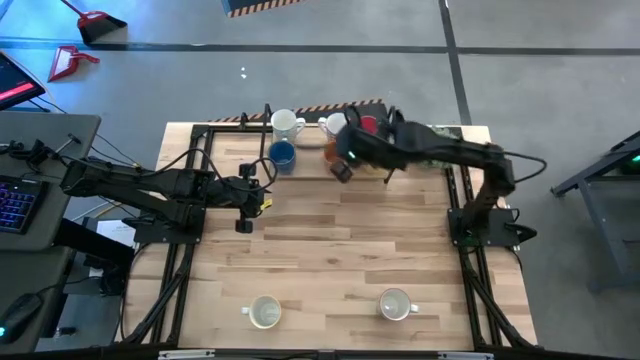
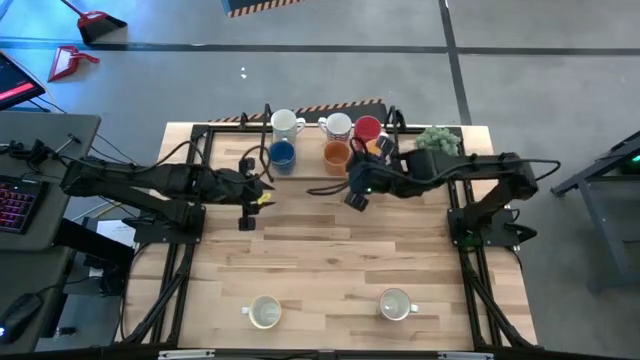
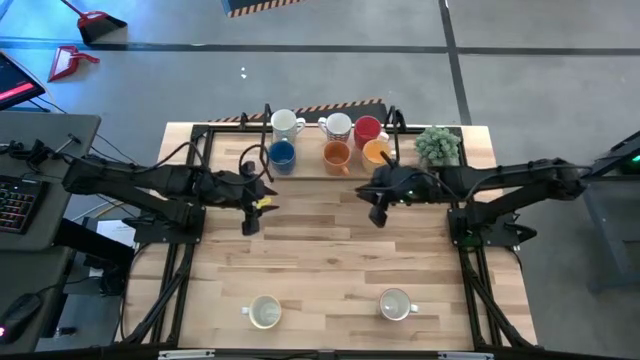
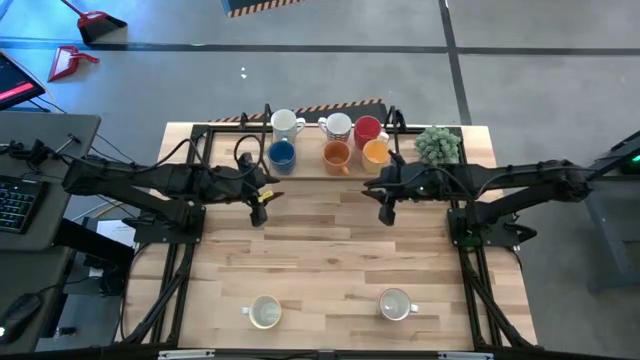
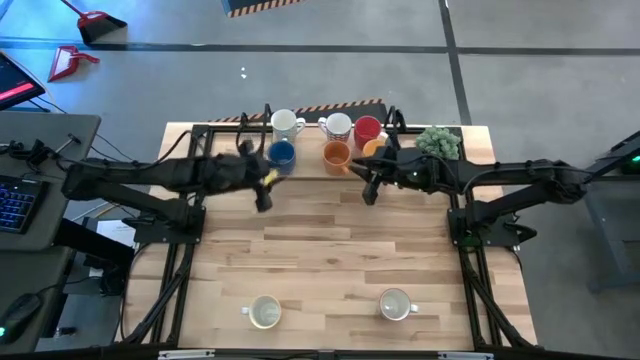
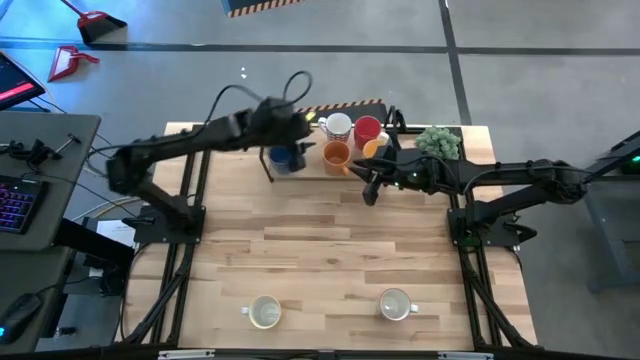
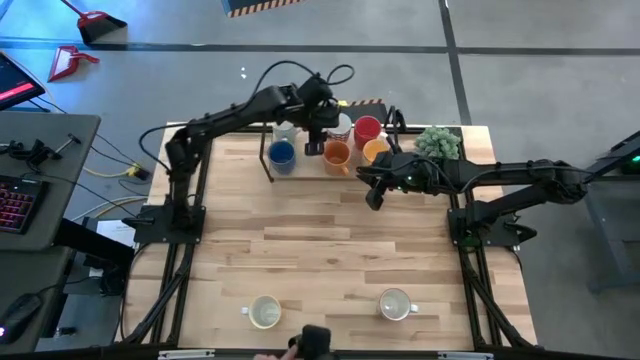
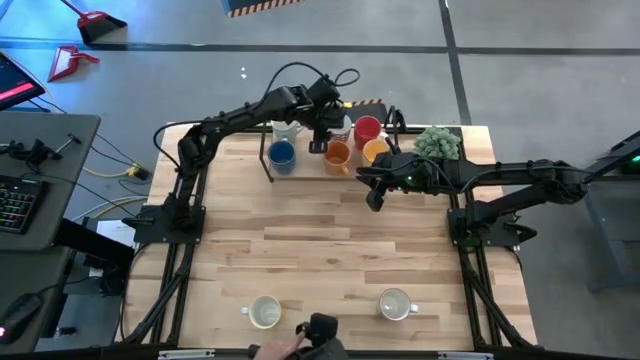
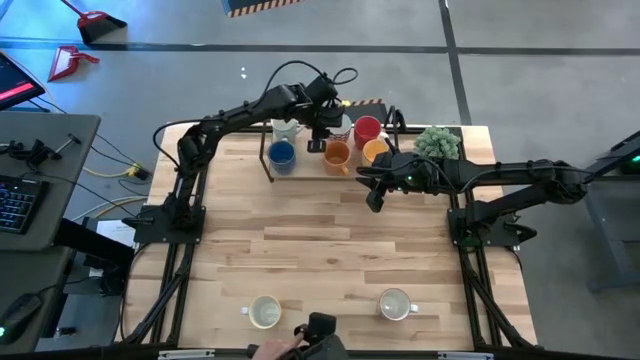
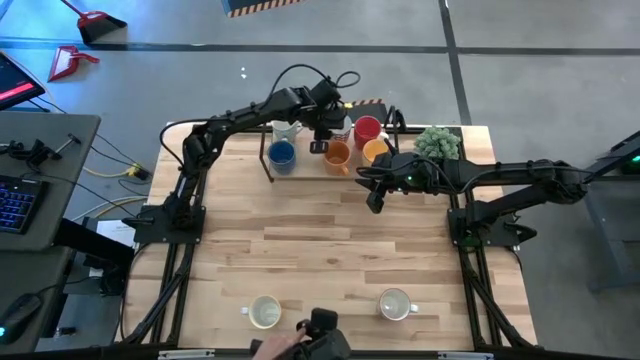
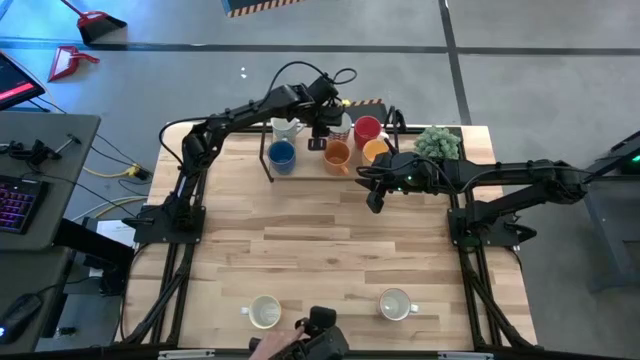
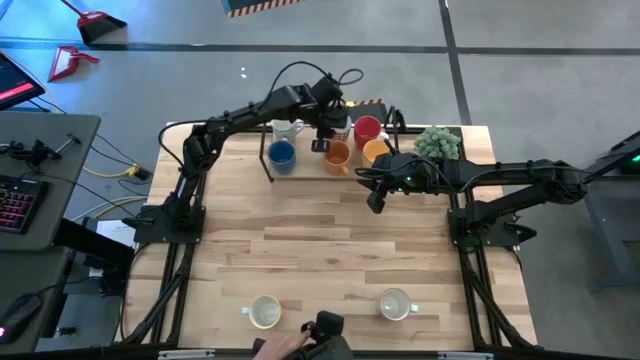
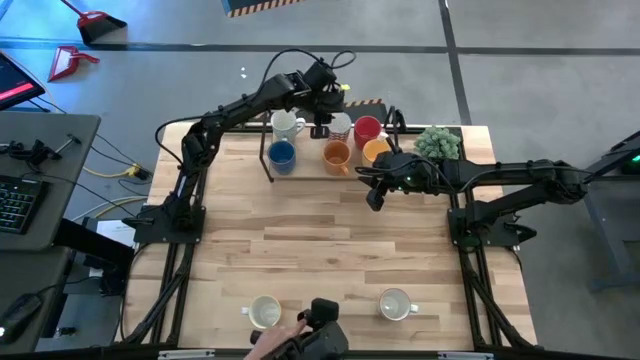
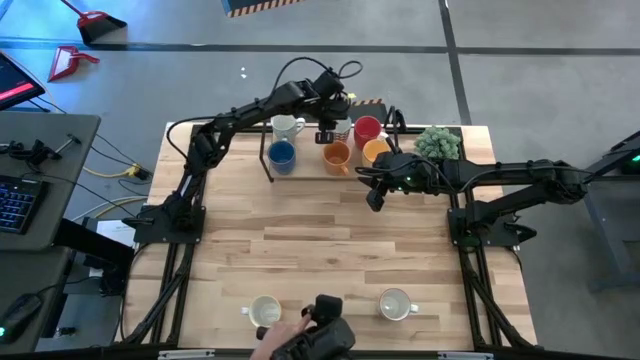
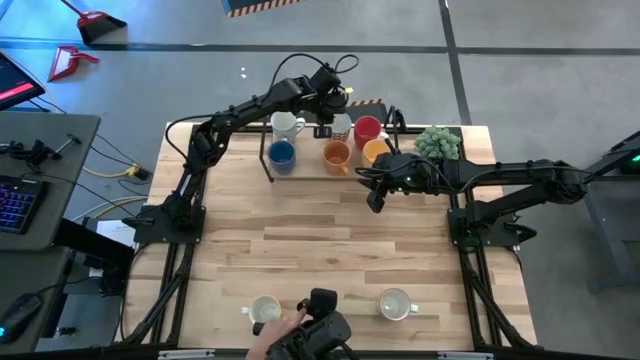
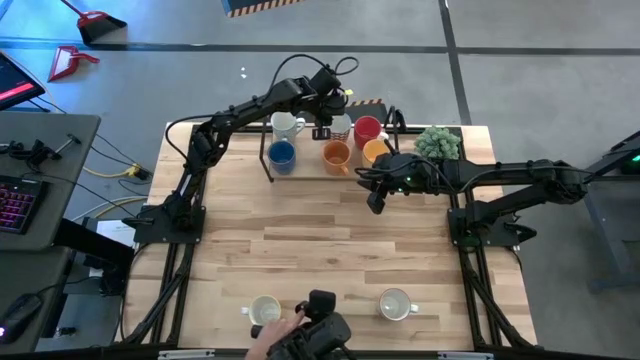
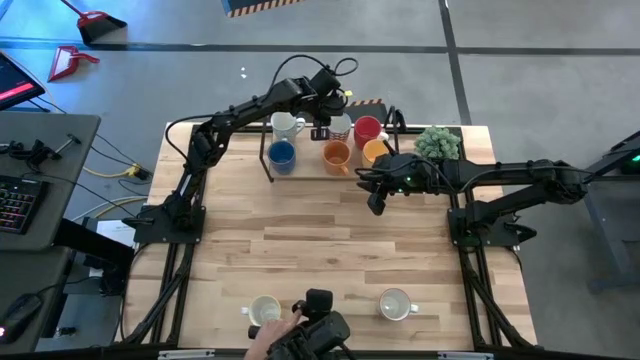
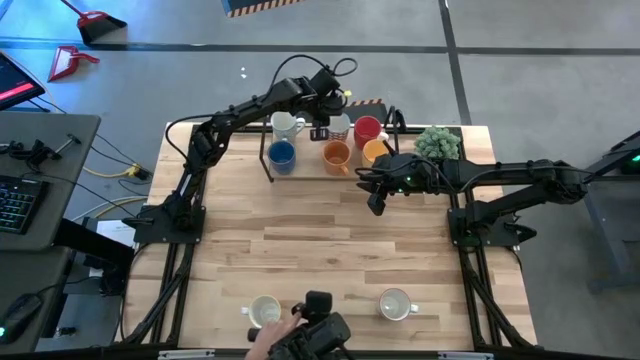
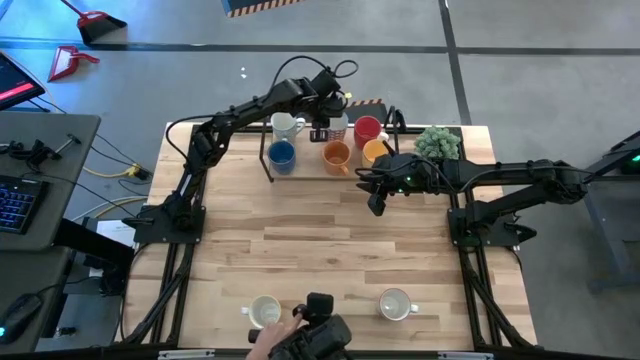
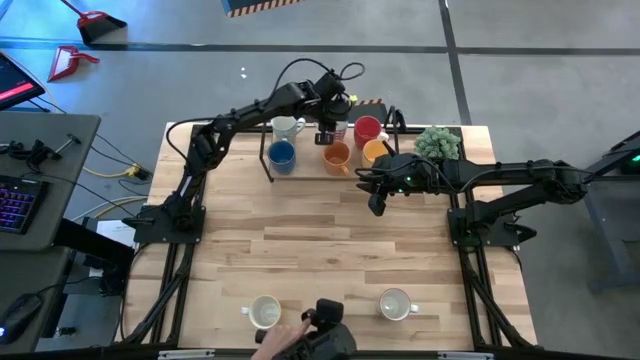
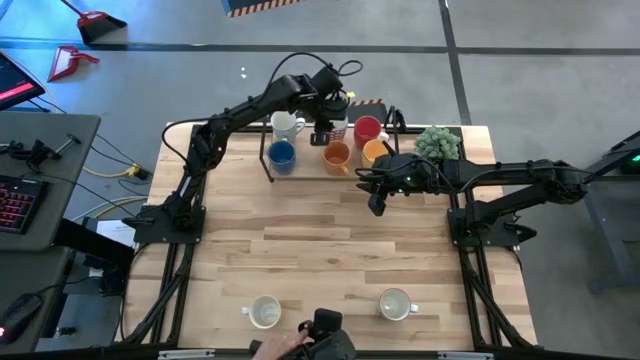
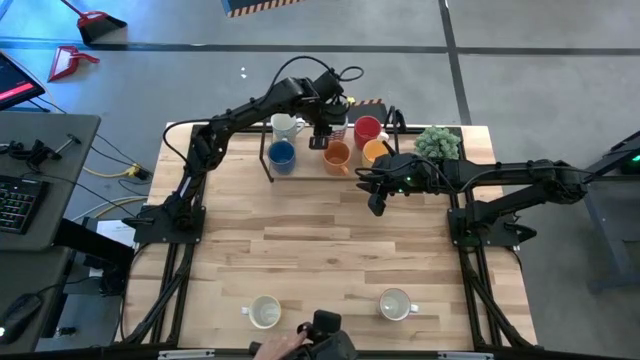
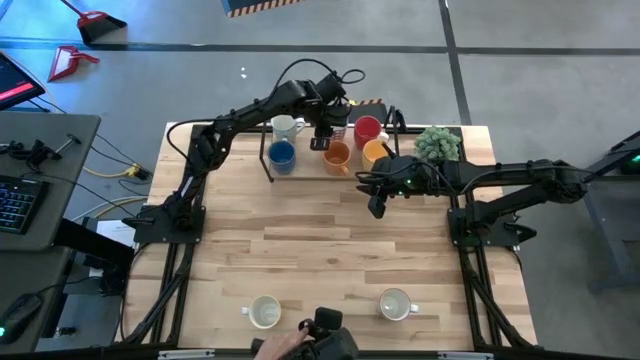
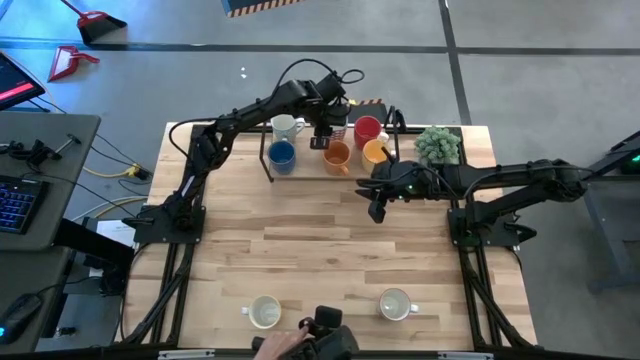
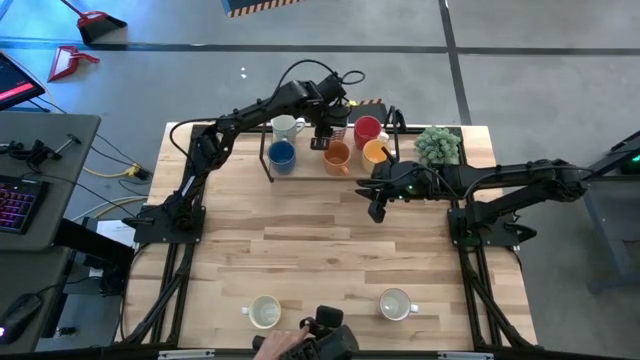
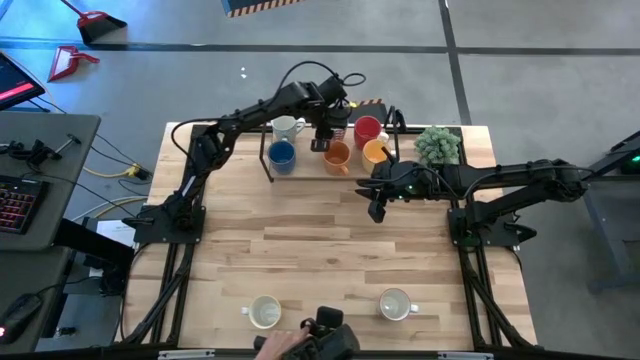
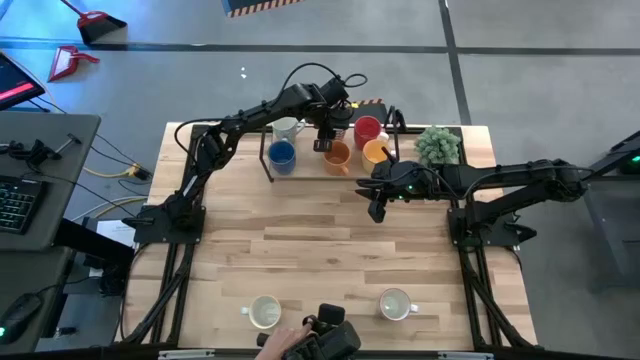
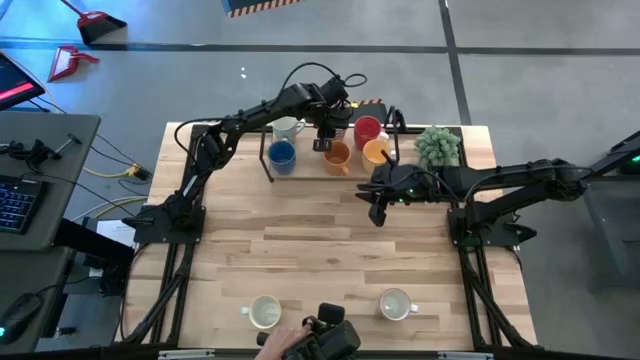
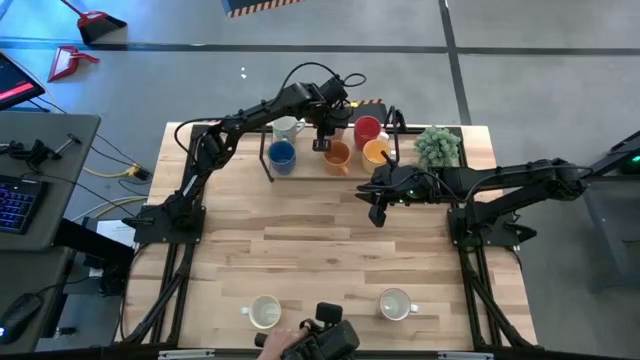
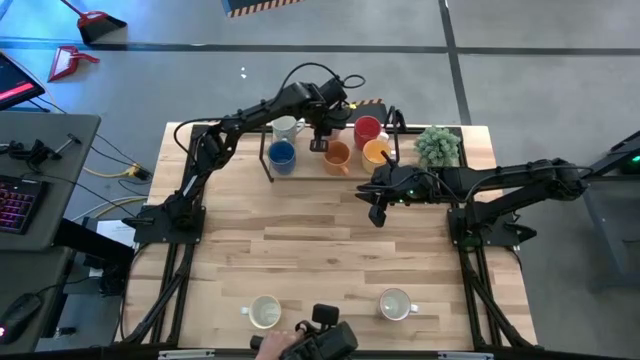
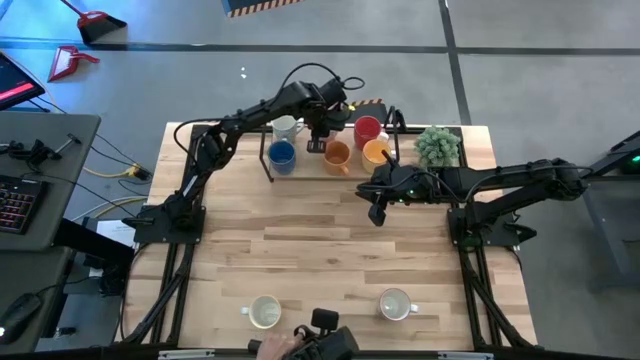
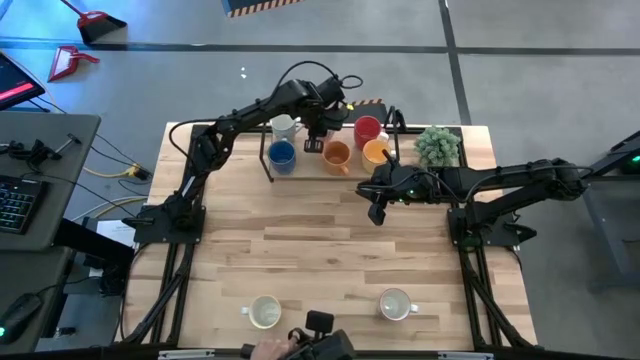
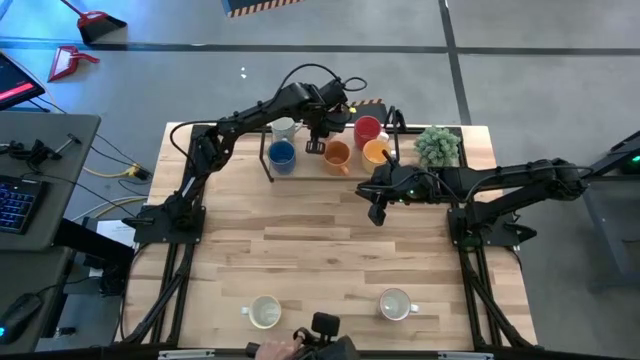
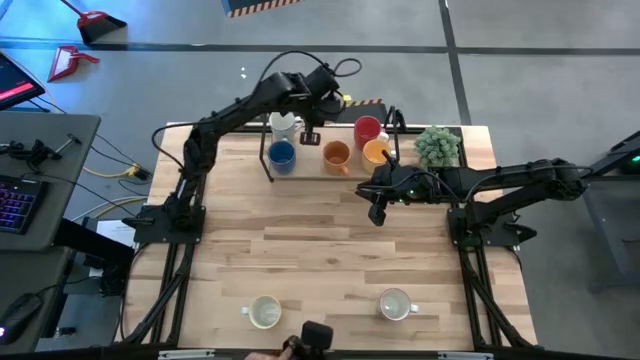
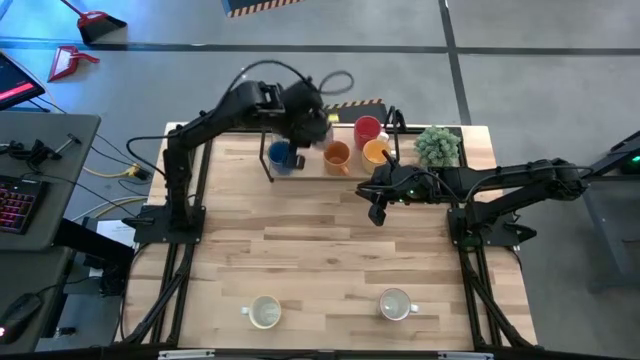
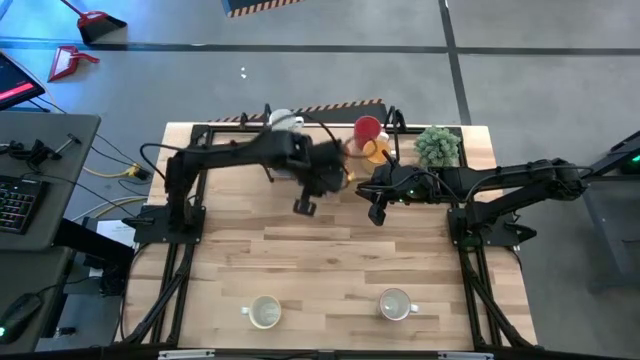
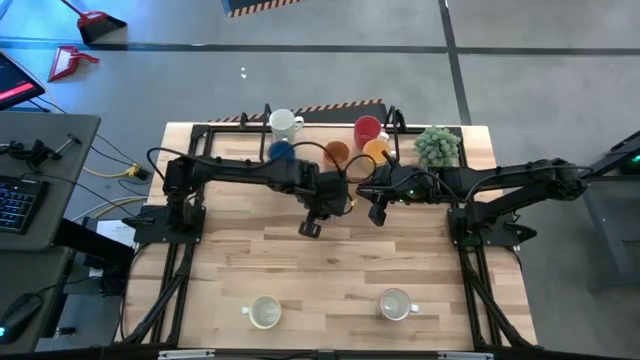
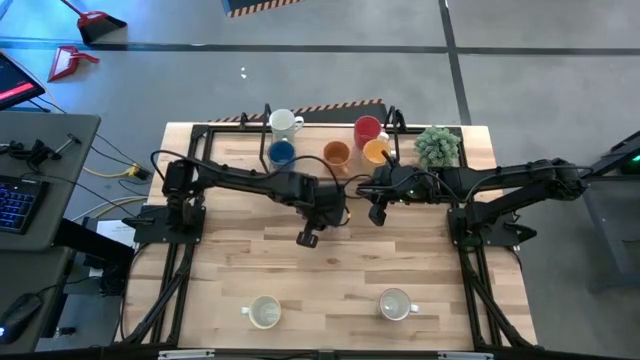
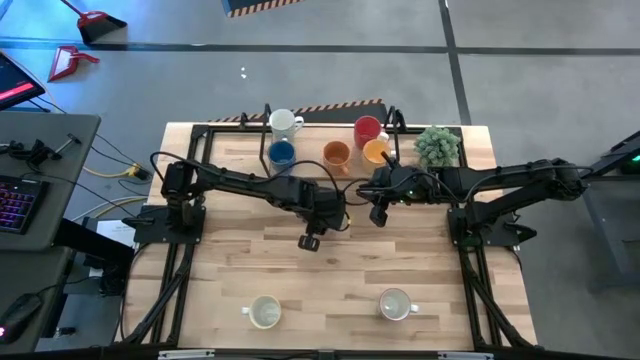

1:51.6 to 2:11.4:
Task: Place coffee mugs
Remove the white red mug from the shelf

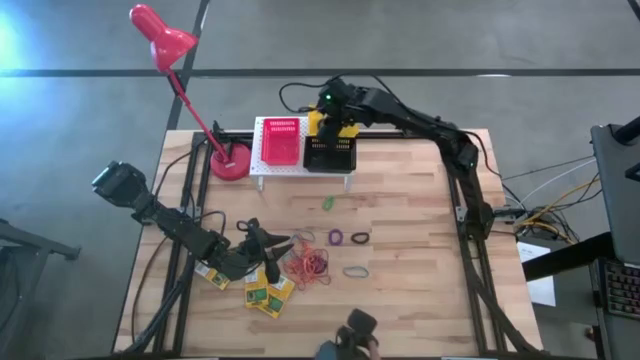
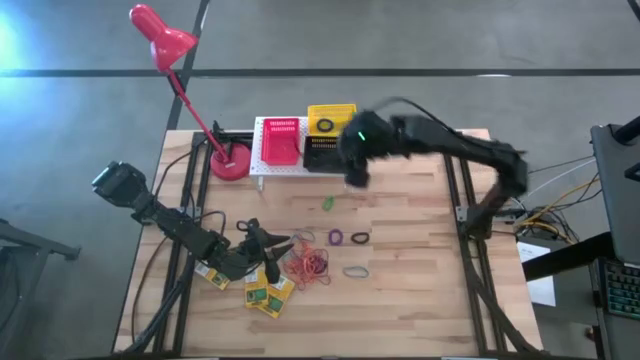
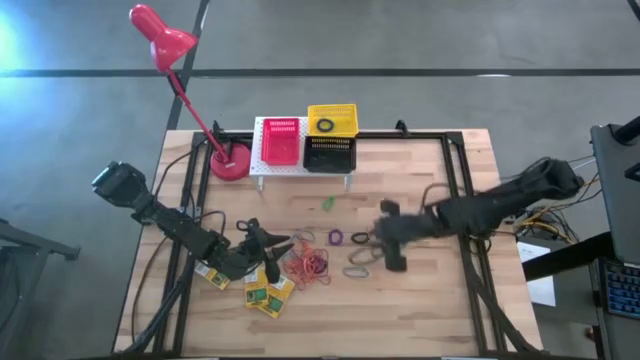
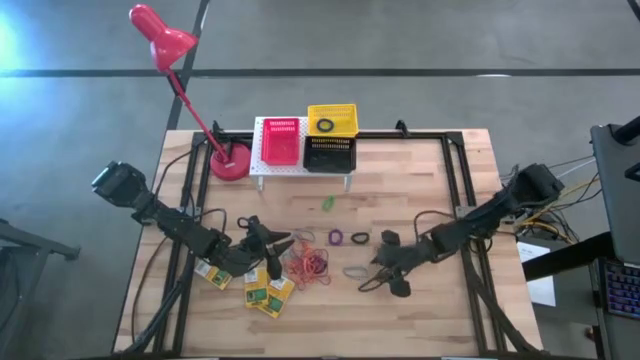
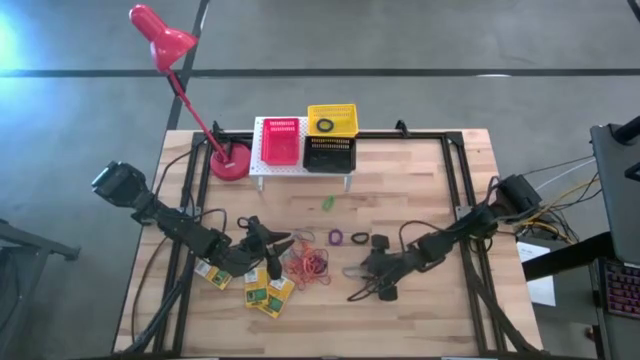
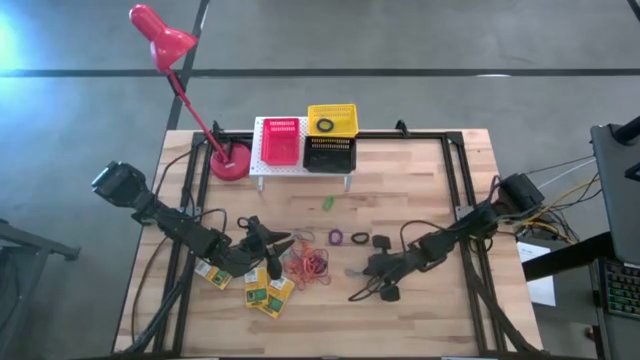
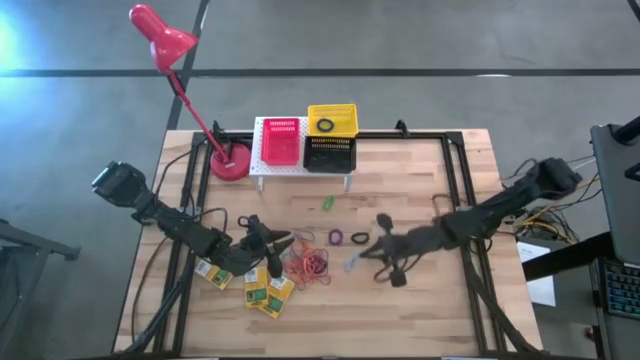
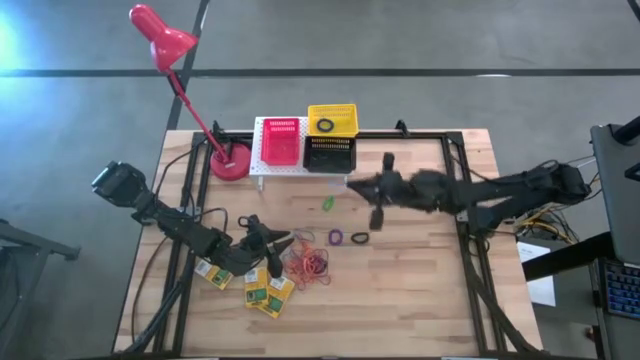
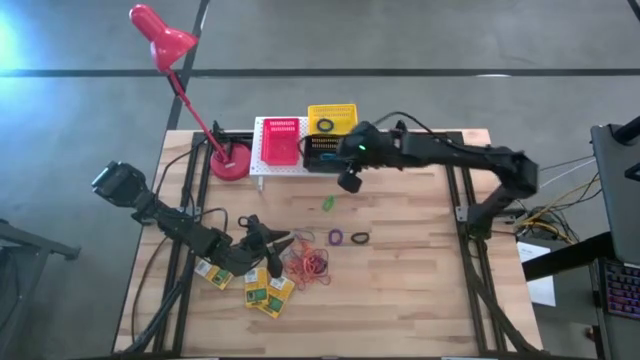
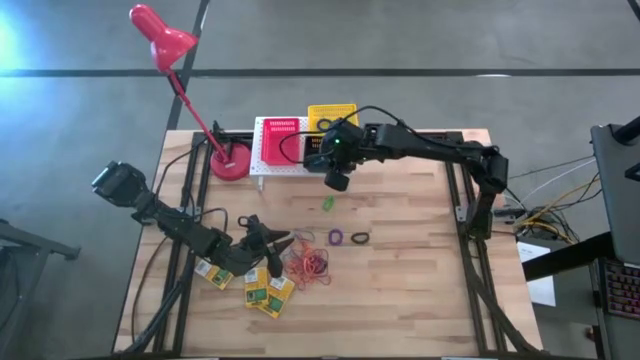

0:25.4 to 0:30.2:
Task: Pick & Place Office Desk Supplies
Put the blue rubber band into the black bin on the shelf
